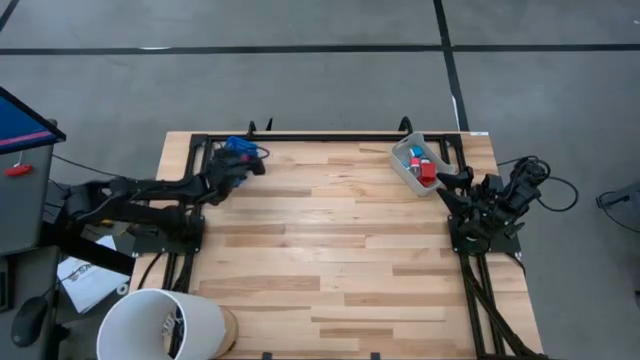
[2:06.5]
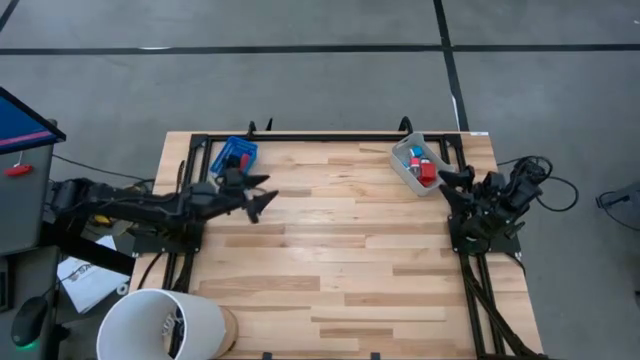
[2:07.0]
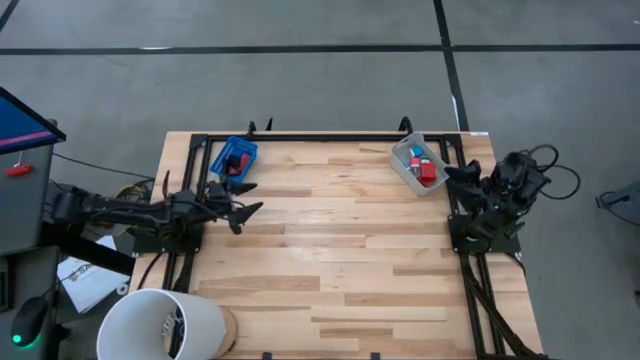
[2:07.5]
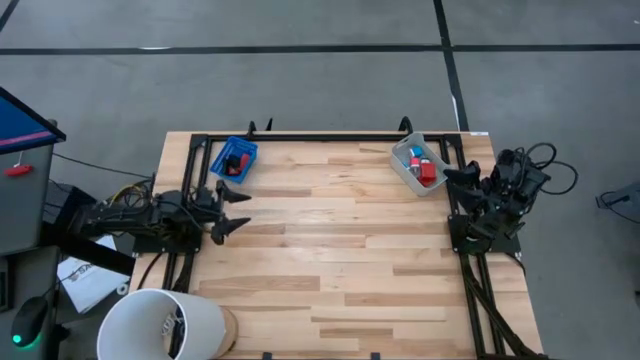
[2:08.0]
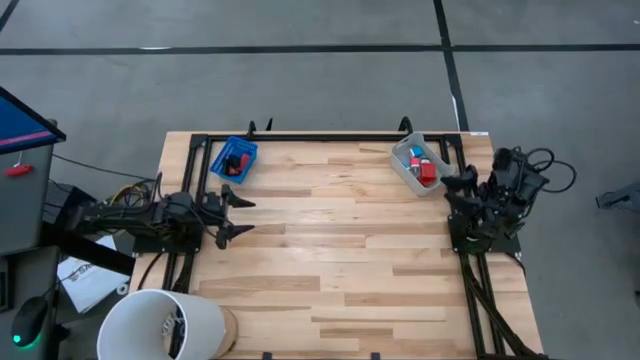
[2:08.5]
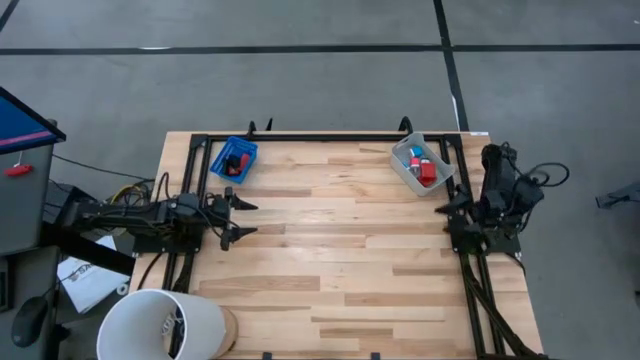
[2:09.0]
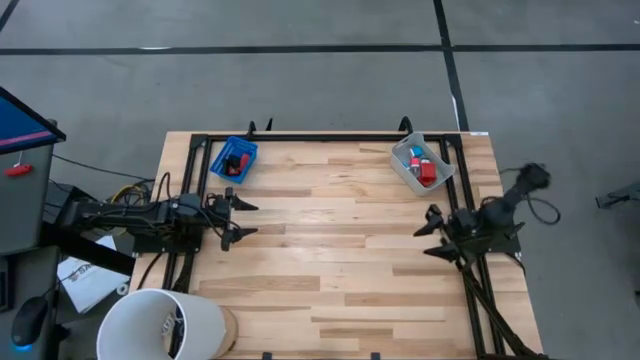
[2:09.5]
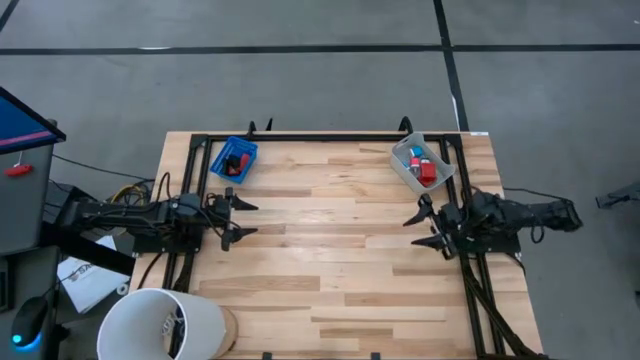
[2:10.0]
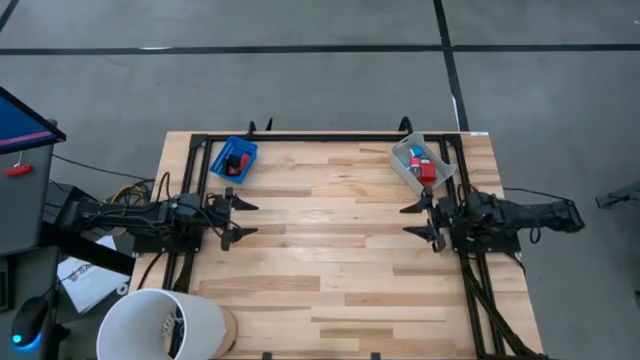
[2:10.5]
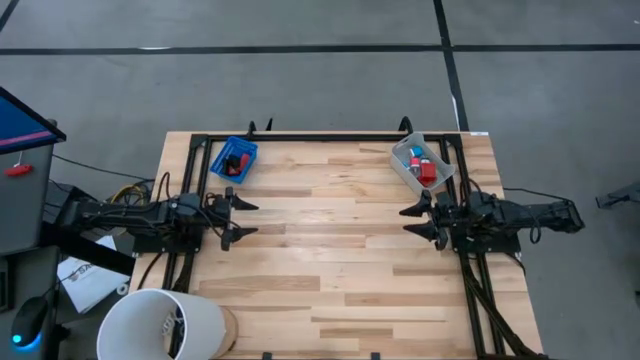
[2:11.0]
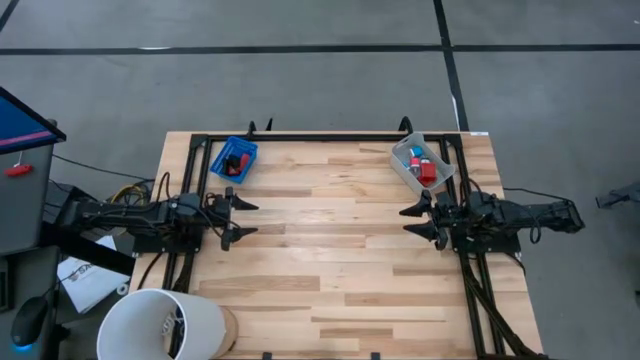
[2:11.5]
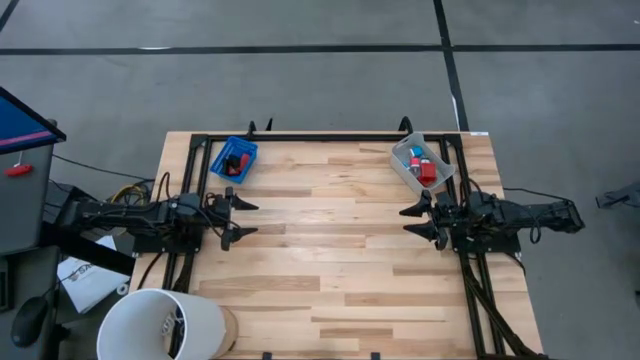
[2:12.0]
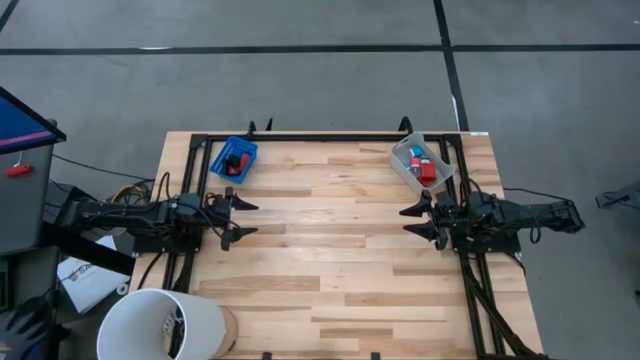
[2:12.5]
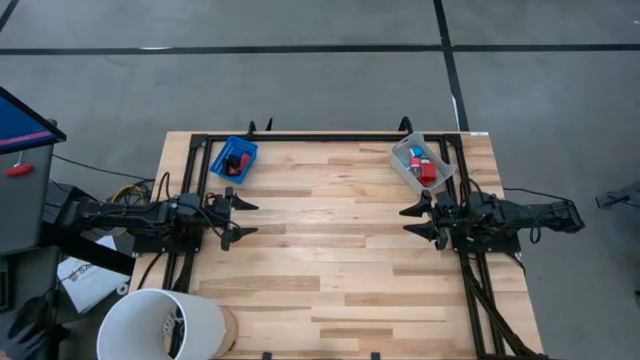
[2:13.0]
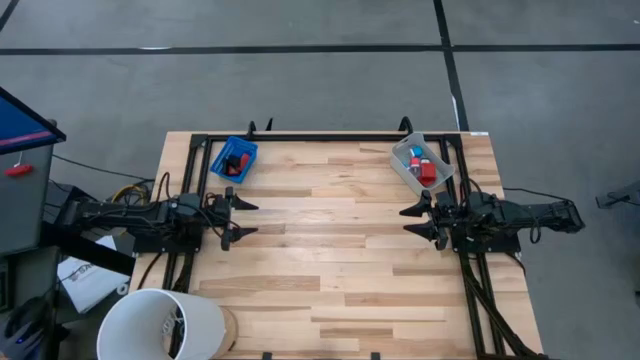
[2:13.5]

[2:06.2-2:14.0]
Task: Pick & Place Office items
Return to Home Position

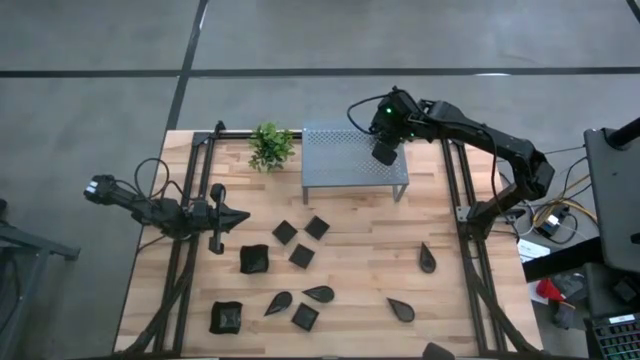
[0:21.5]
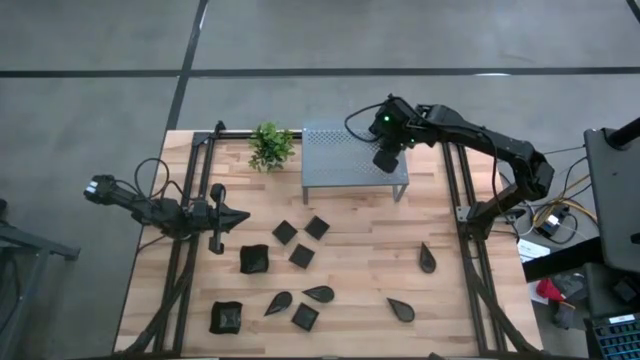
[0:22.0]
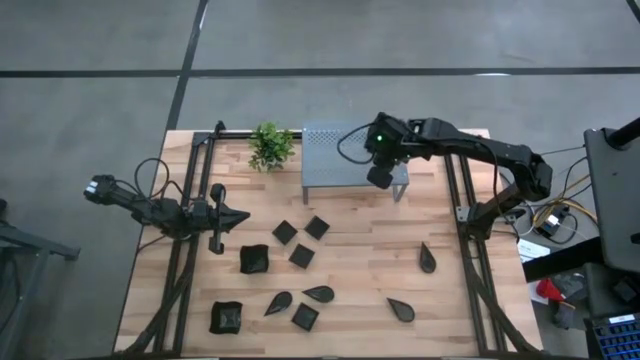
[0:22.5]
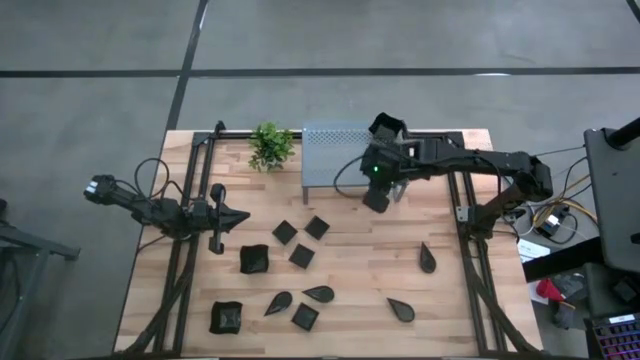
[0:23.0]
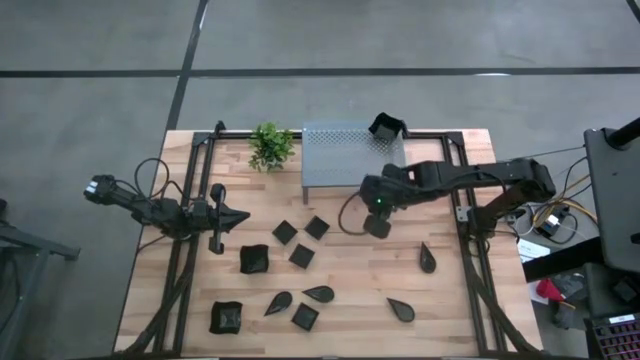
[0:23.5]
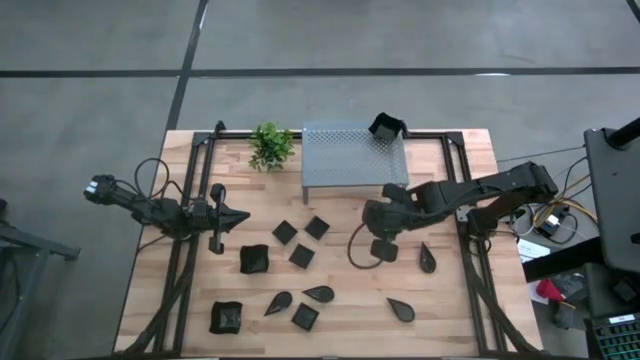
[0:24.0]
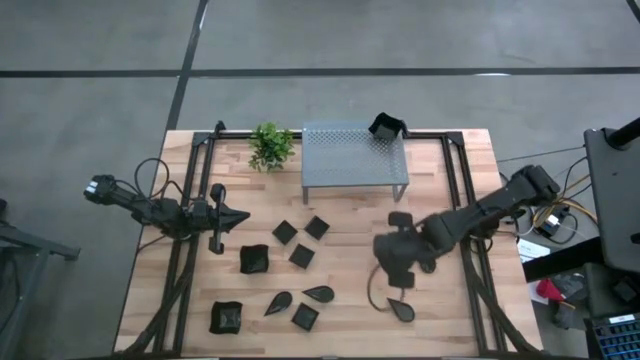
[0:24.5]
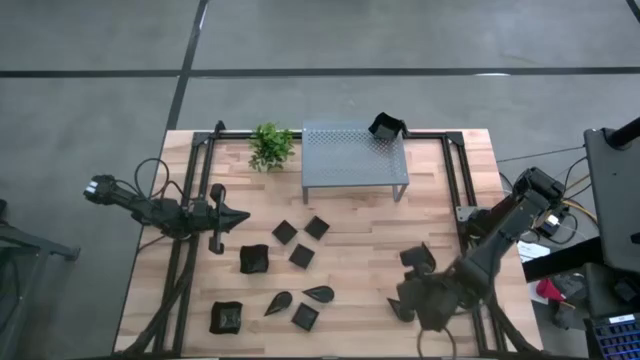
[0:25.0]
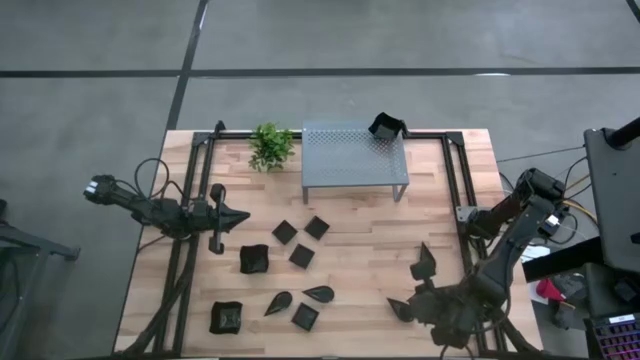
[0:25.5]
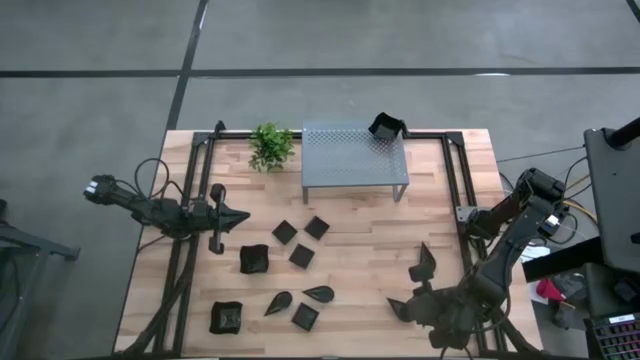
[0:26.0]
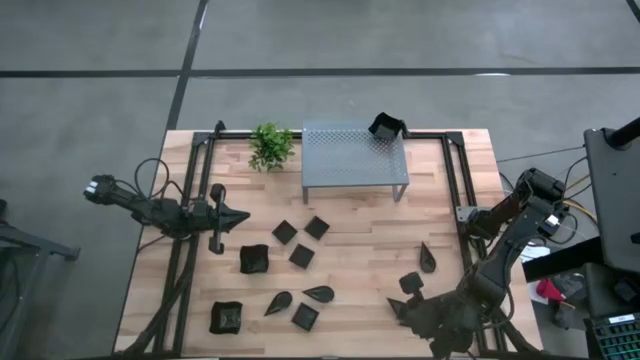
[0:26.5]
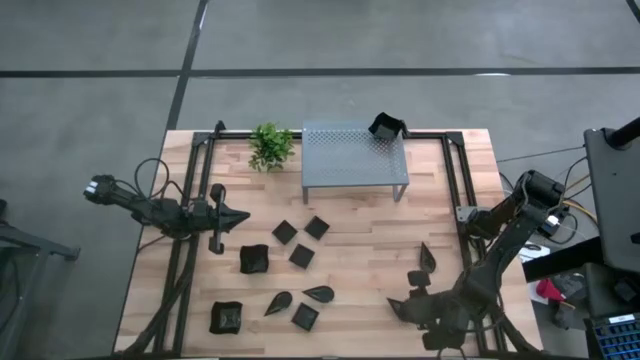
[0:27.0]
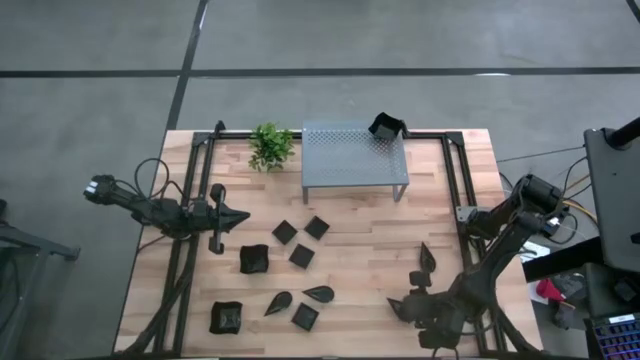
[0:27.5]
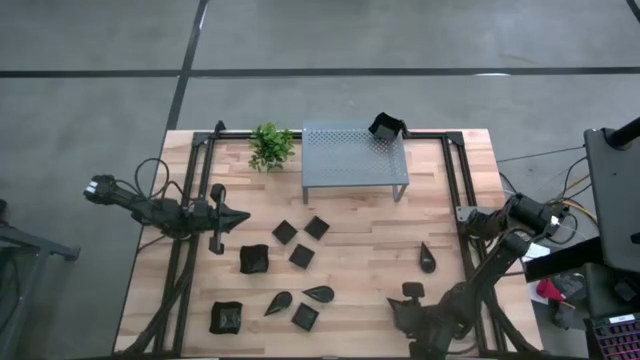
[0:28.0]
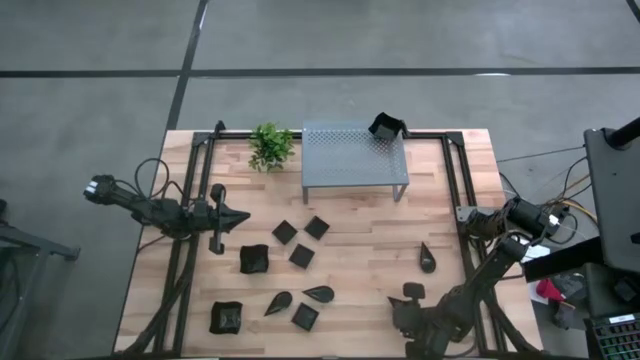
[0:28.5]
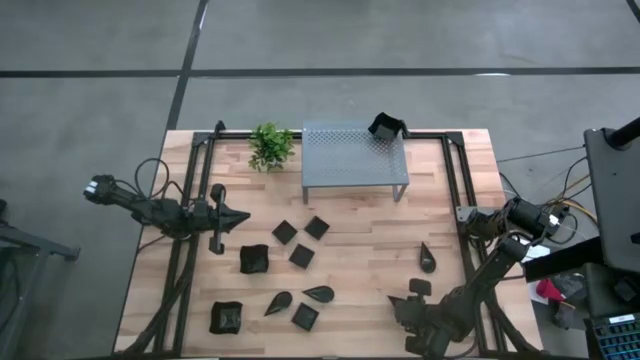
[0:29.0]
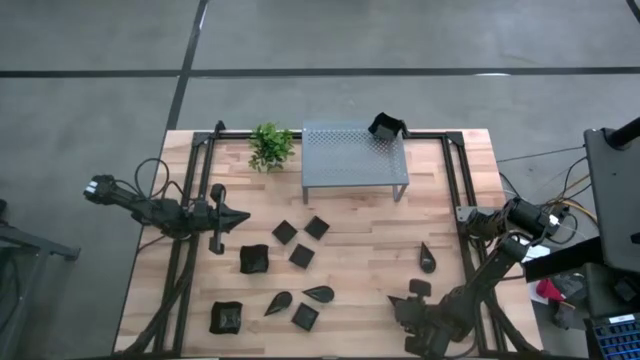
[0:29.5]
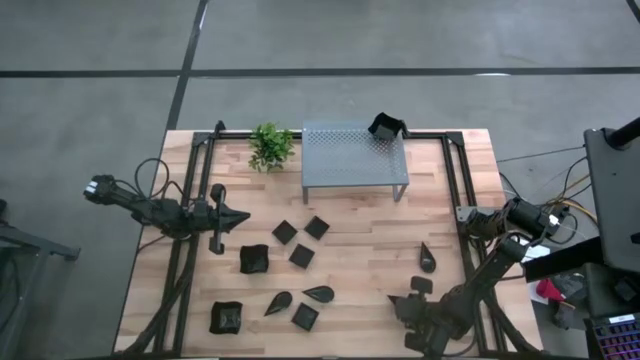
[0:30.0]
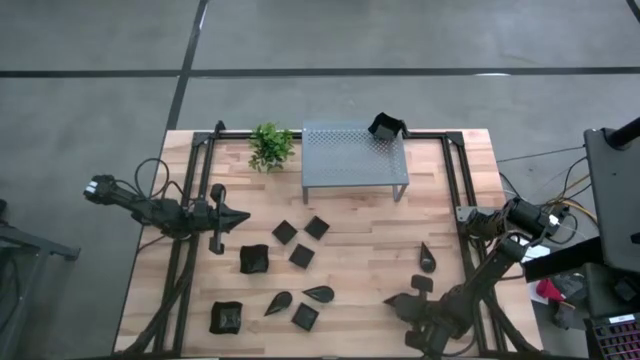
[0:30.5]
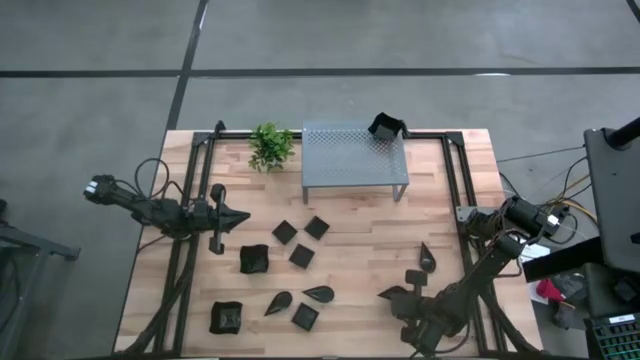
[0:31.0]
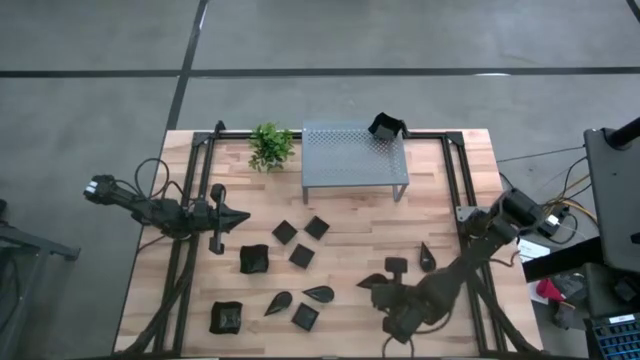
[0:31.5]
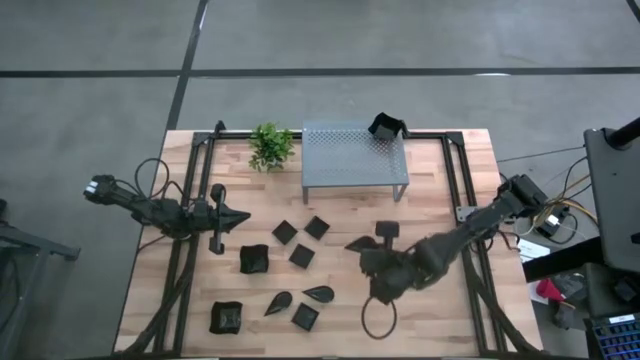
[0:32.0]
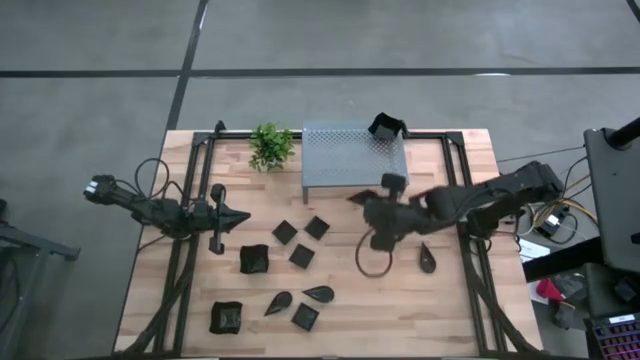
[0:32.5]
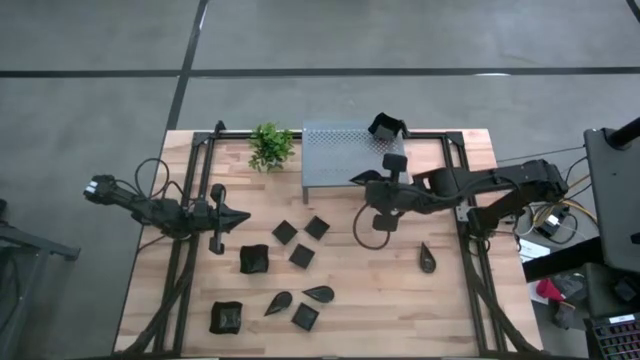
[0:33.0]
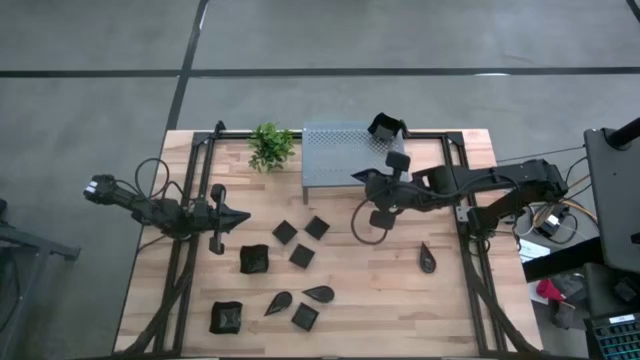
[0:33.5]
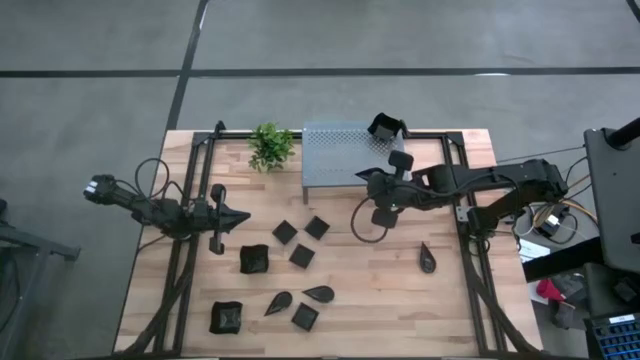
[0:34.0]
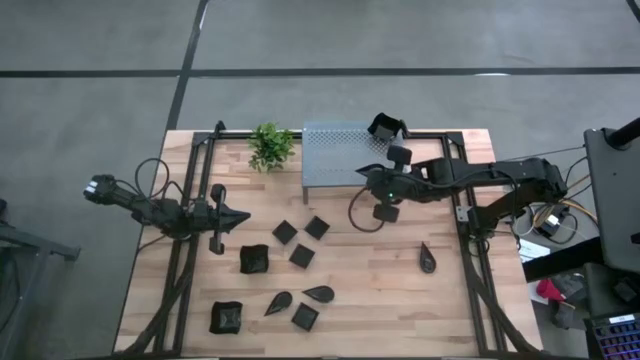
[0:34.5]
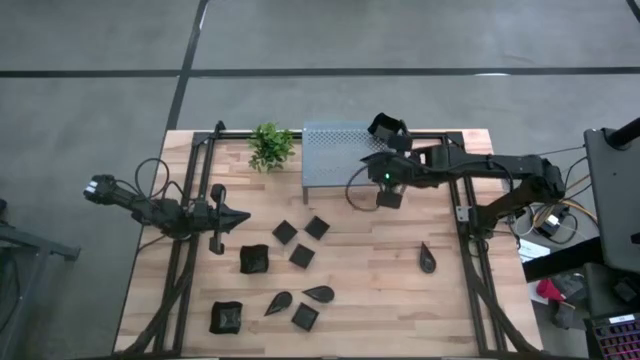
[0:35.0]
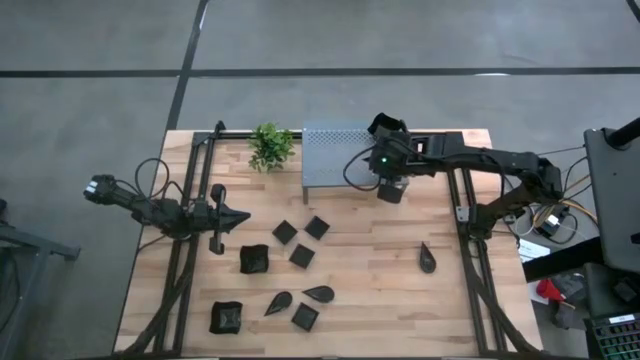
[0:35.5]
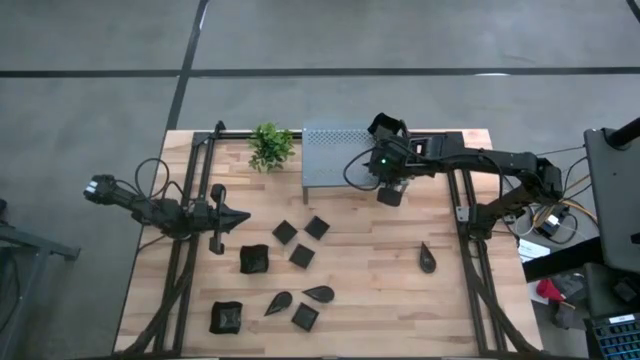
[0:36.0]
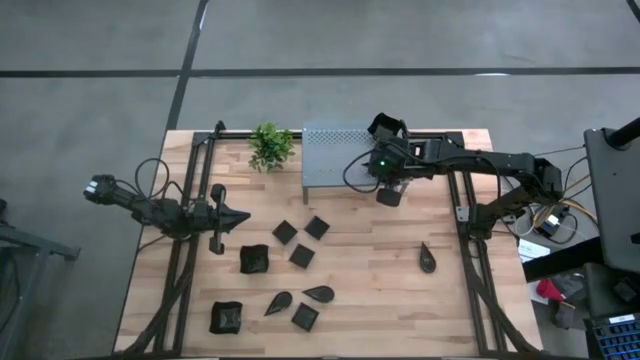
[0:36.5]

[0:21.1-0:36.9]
Task: Pick & Place Mini shaped plates
Put the drop shaped plate on the shelf
